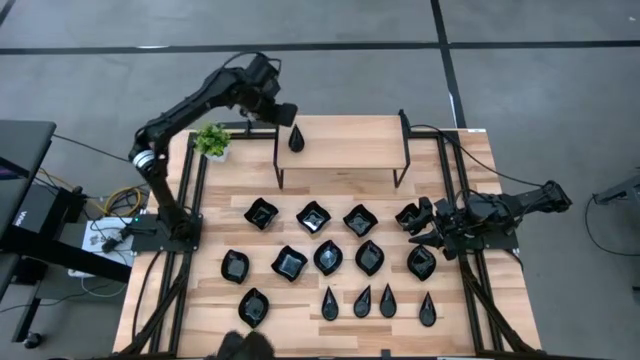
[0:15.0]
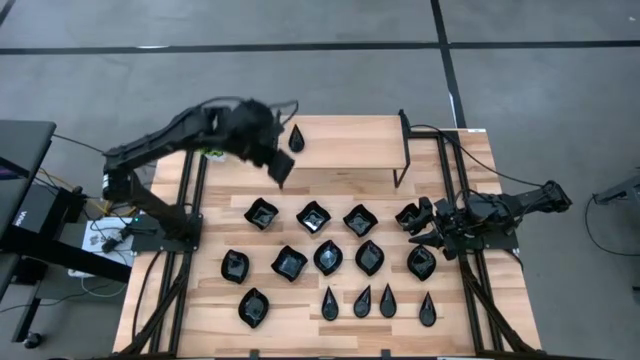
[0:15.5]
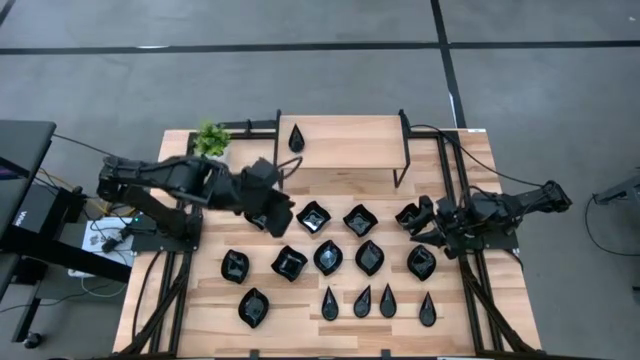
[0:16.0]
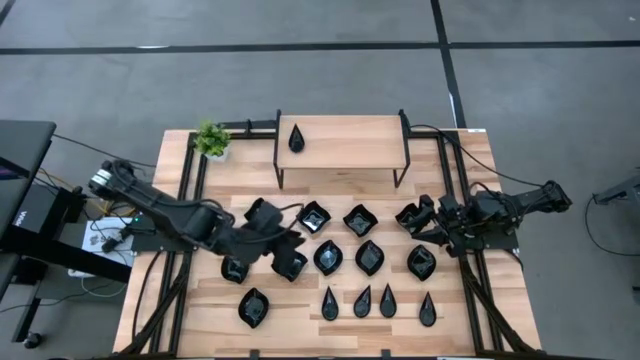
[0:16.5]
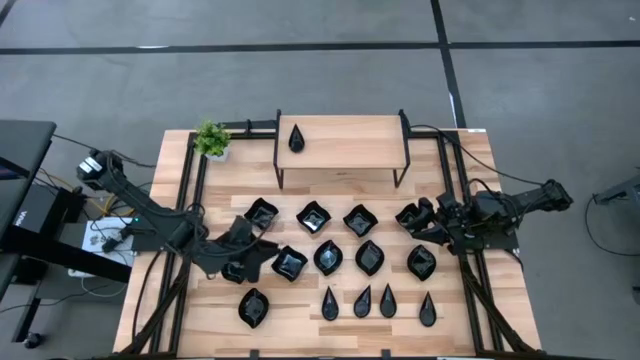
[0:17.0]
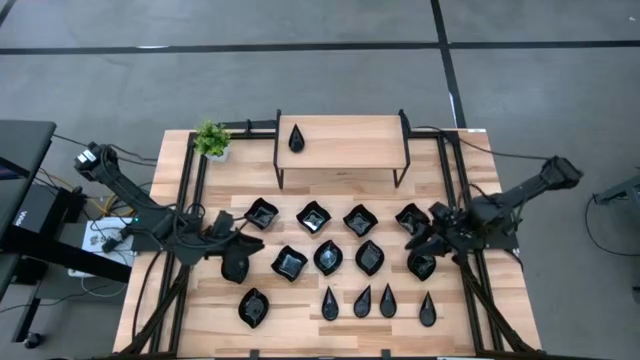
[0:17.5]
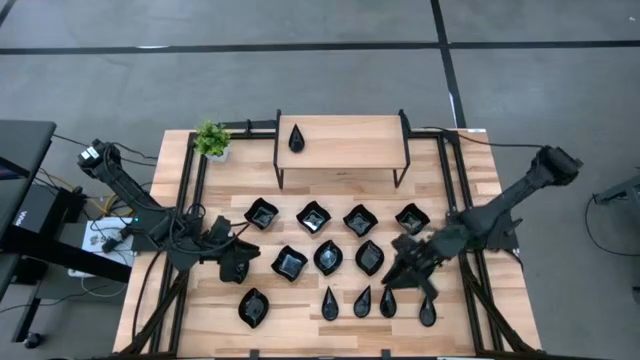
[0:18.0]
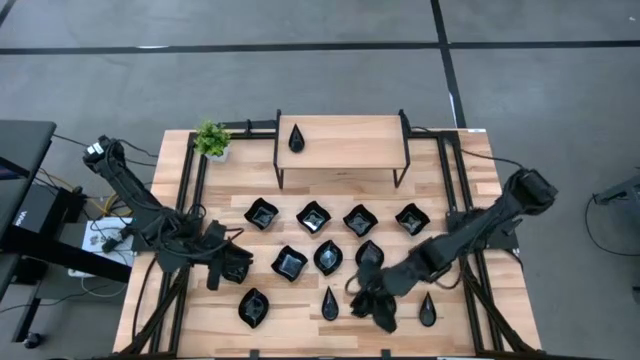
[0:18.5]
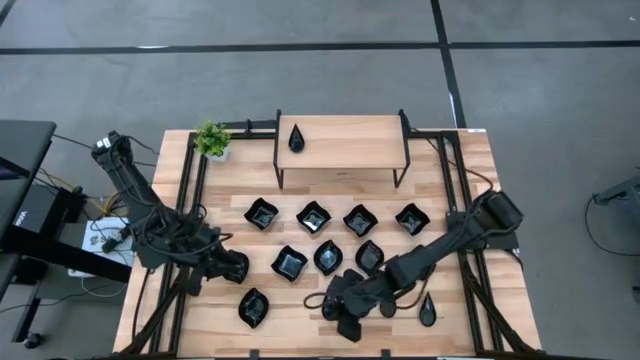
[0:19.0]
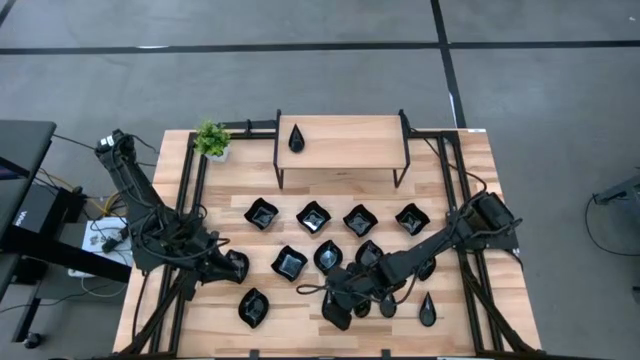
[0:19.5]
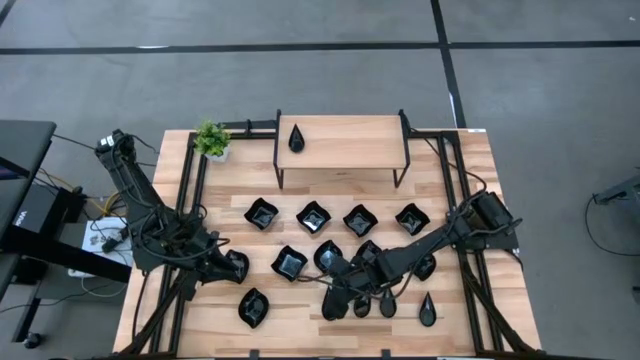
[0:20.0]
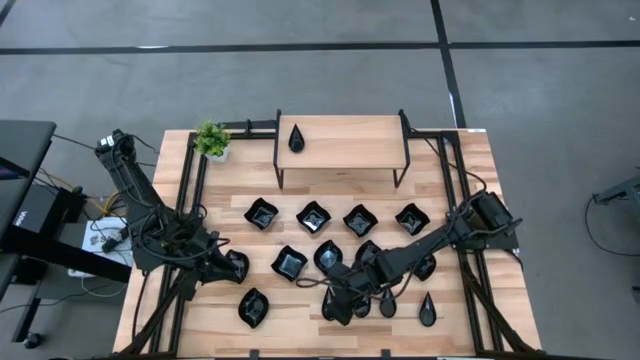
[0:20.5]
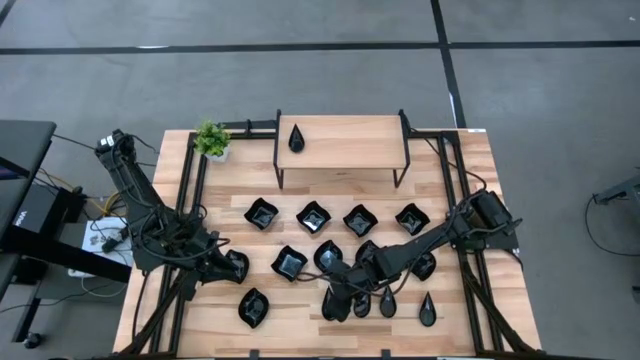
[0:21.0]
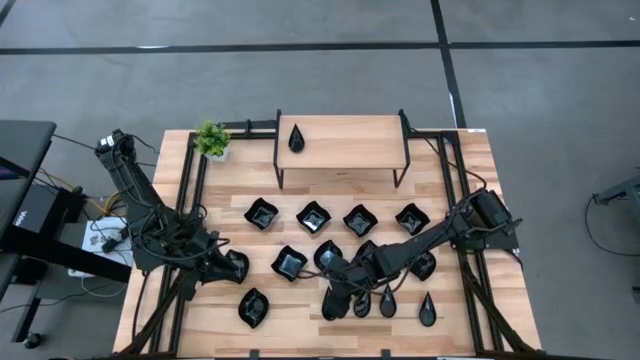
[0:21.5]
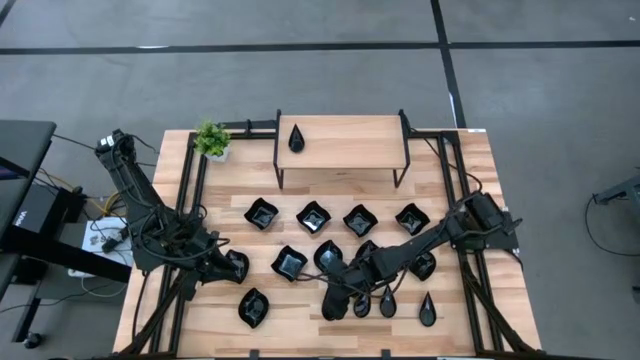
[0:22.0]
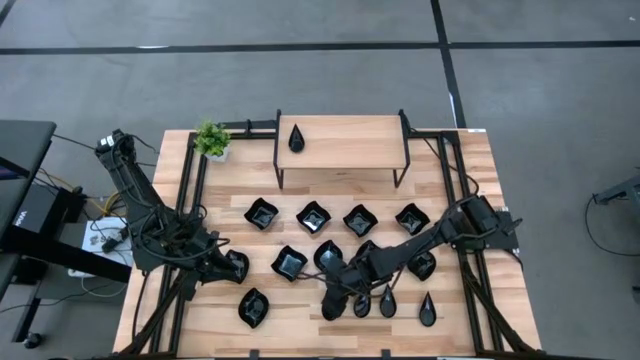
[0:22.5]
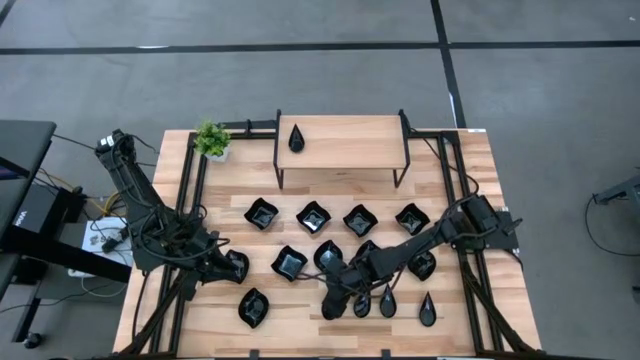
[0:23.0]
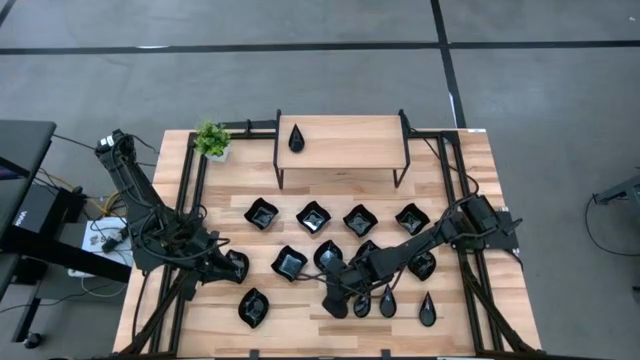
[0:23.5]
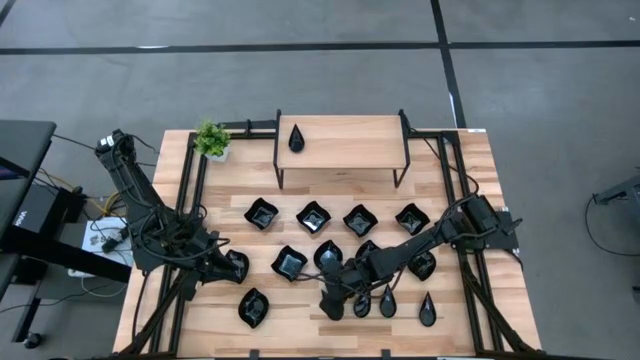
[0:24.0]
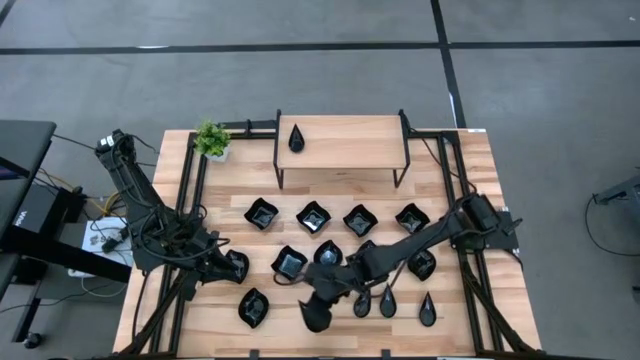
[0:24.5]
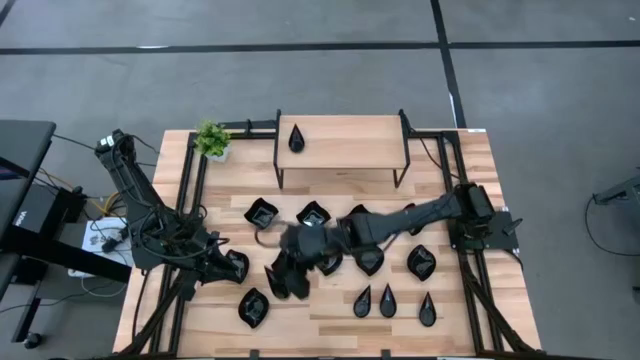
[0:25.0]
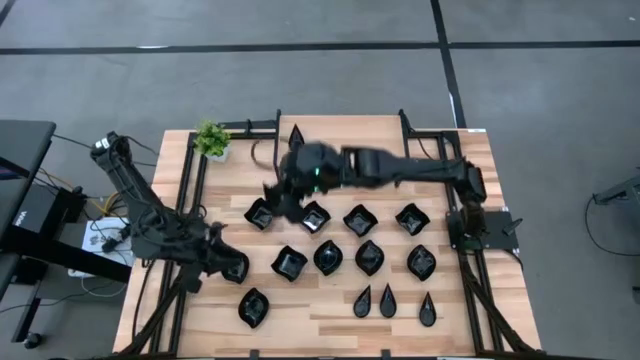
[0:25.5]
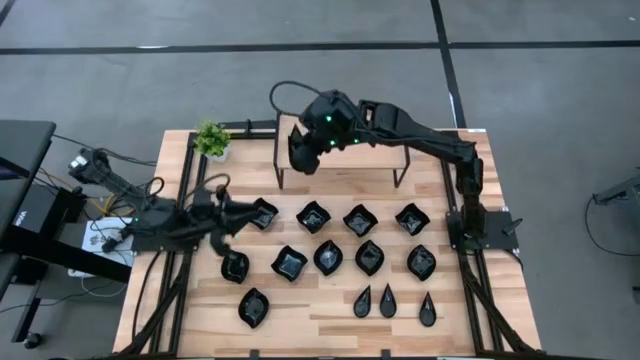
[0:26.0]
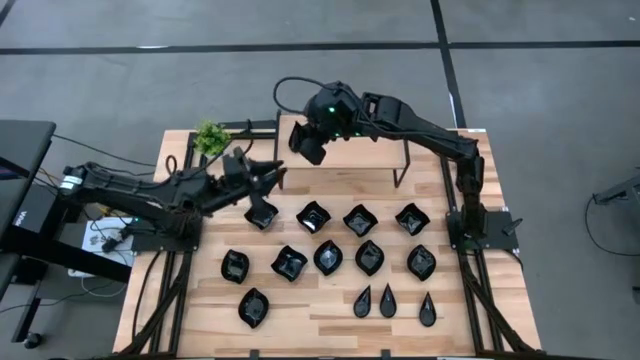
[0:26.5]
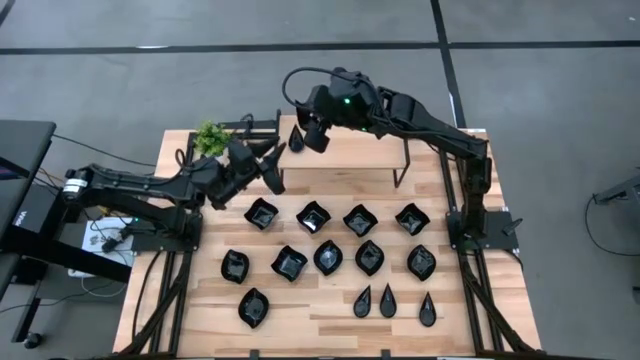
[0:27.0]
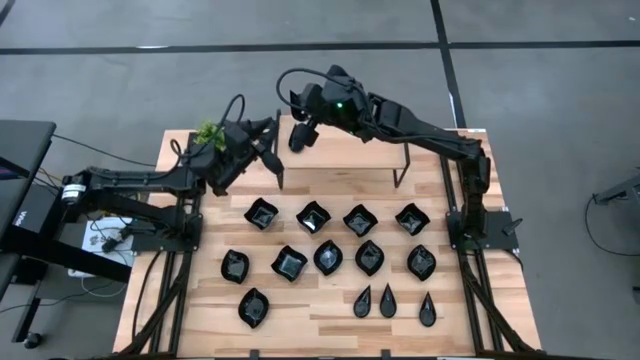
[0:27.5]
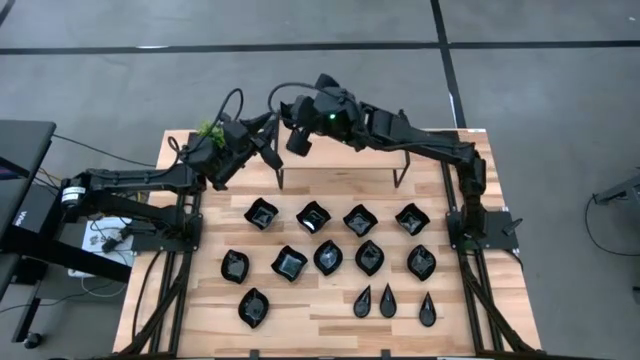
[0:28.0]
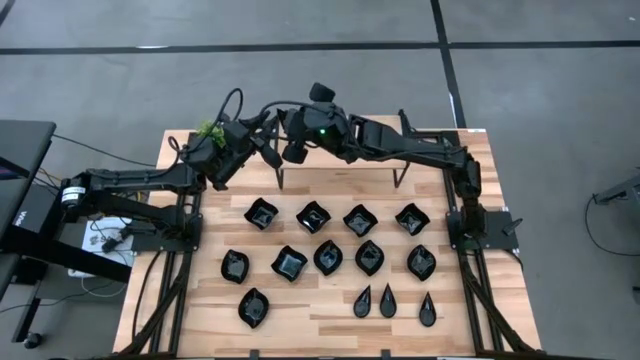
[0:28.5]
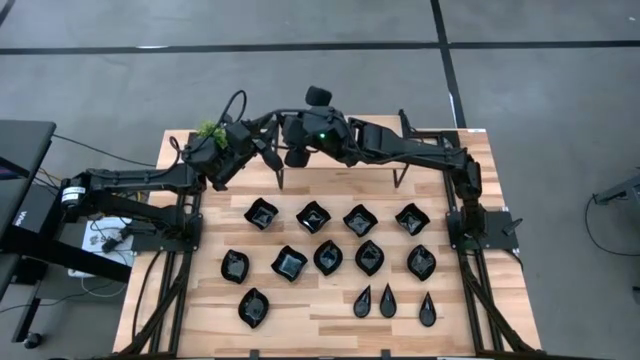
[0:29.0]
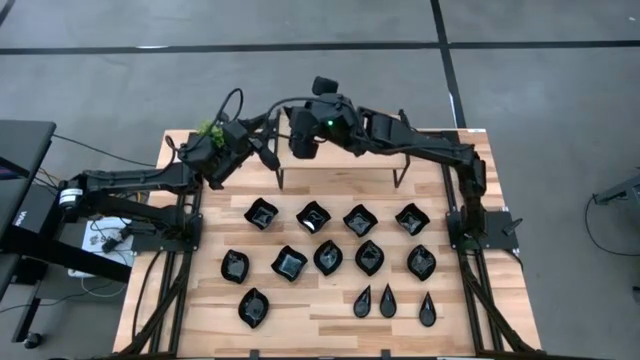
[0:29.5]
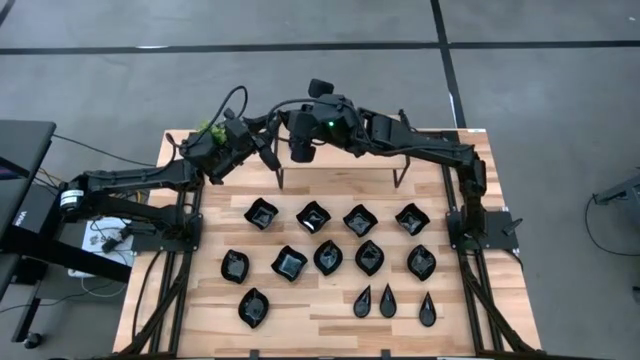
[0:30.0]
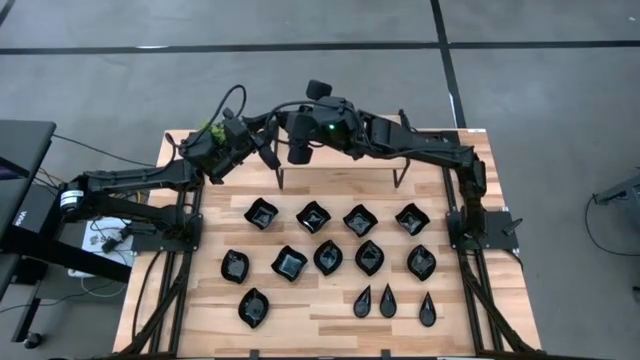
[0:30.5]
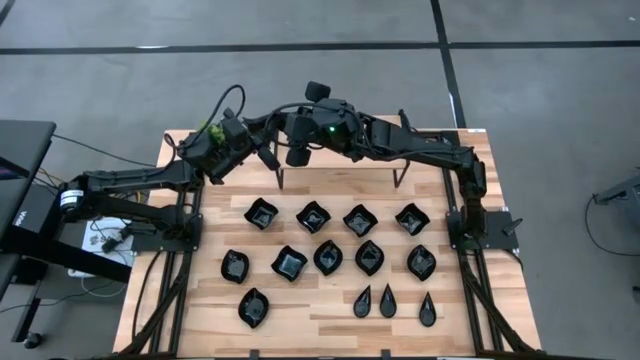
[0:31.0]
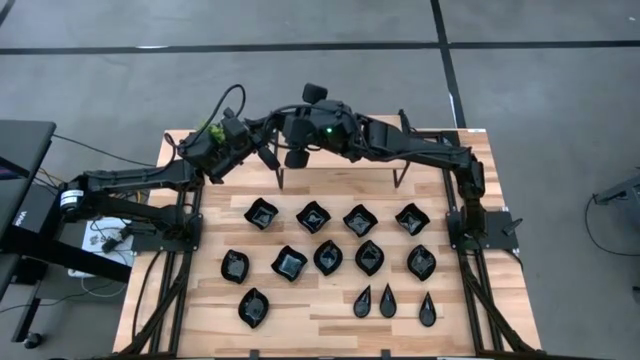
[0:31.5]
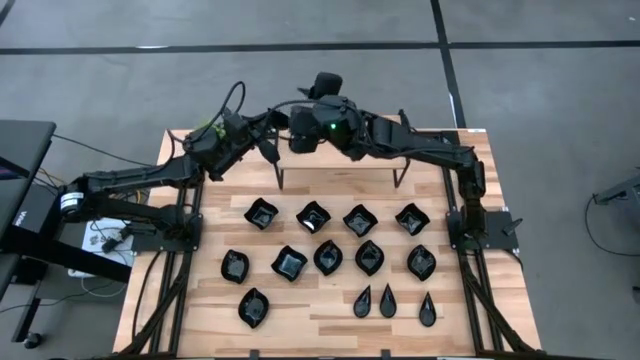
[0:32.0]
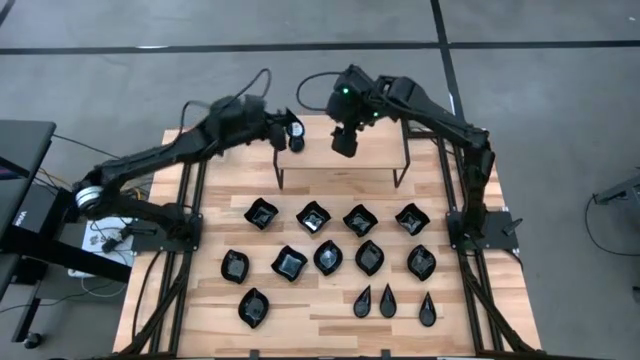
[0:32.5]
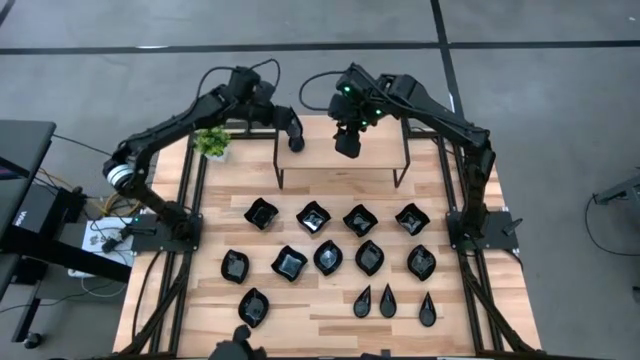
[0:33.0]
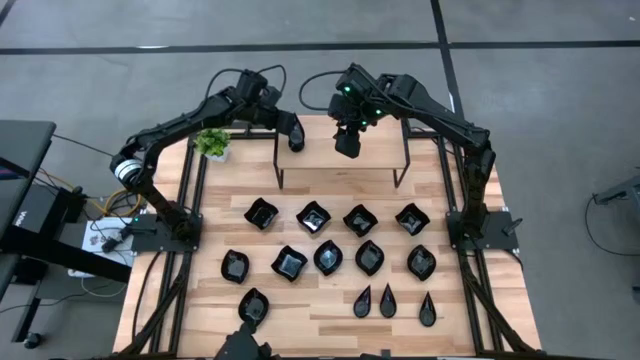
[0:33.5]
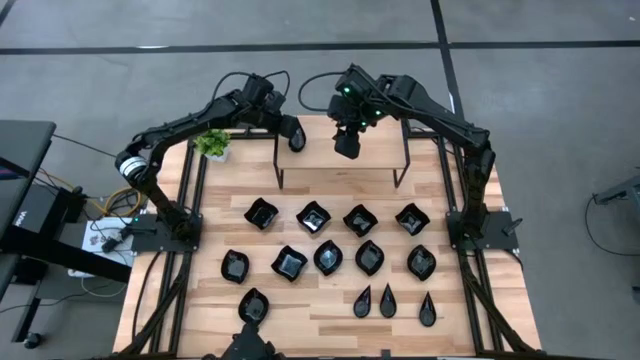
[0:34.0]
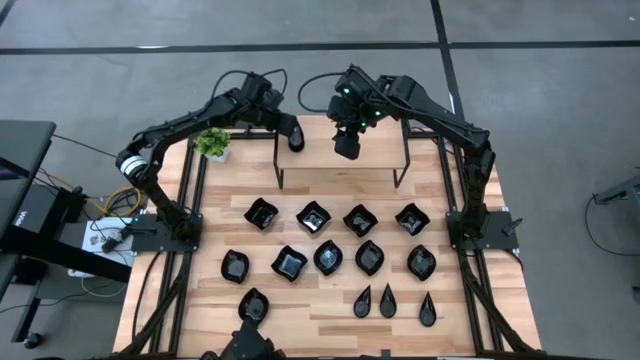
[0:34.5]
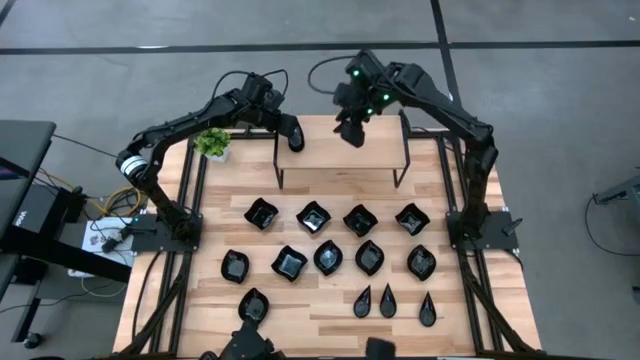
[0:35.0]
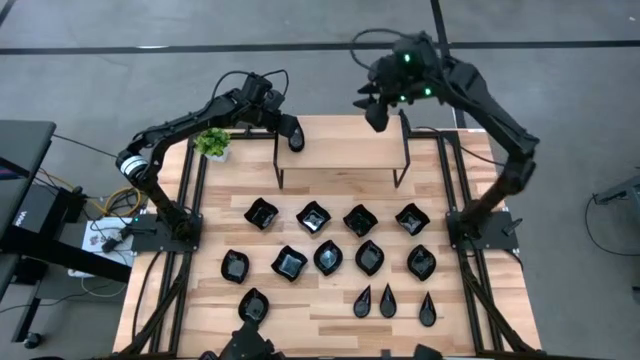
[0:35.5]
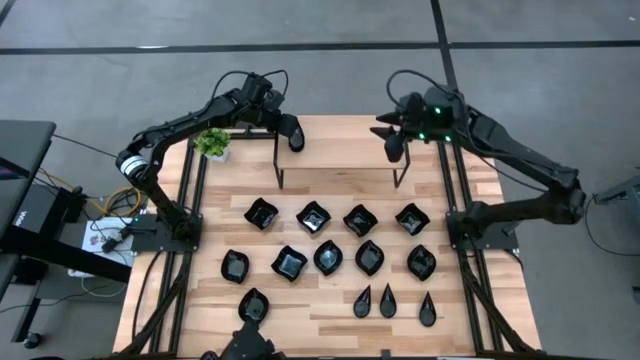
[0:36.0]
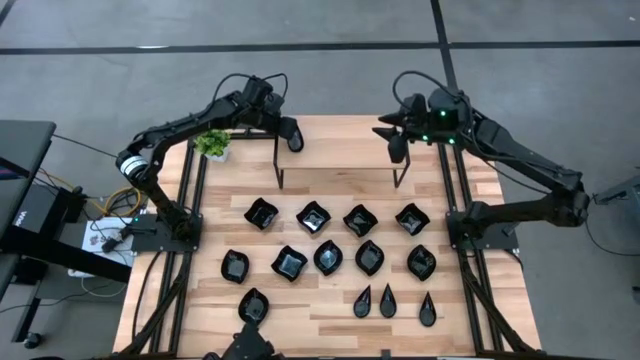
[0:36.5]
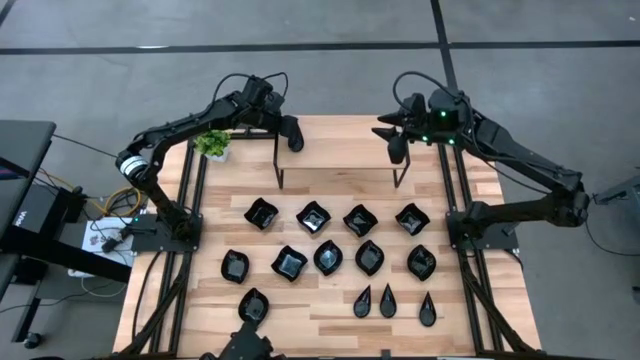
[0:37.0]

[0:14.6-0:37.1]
Task: Pick & Place Mini shaped plates
Stack the black drop shaped plate on top of the black drop shaped plate on the shelf
